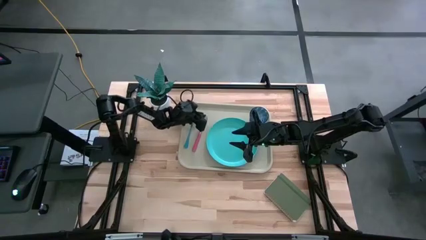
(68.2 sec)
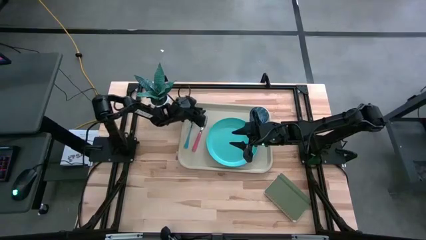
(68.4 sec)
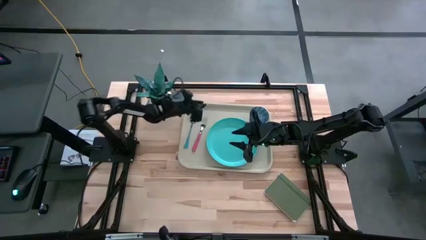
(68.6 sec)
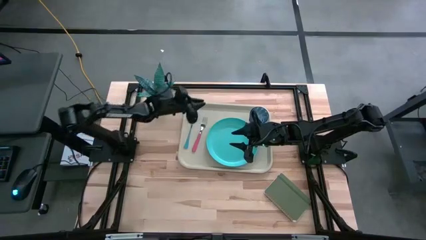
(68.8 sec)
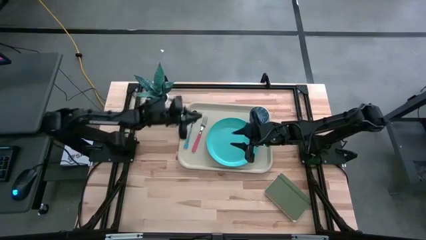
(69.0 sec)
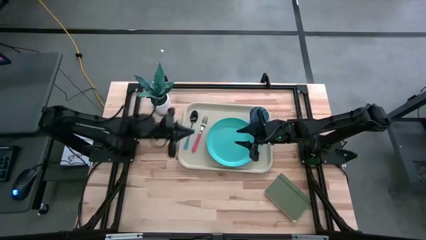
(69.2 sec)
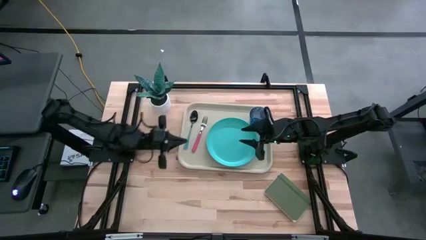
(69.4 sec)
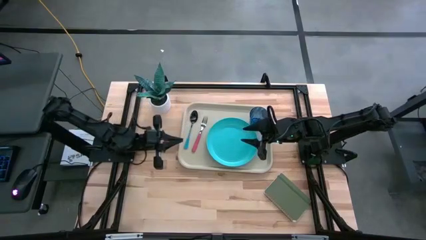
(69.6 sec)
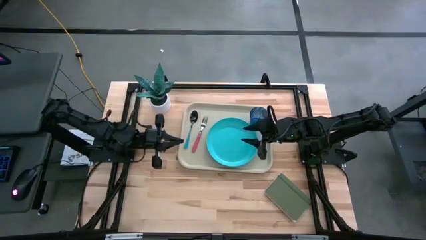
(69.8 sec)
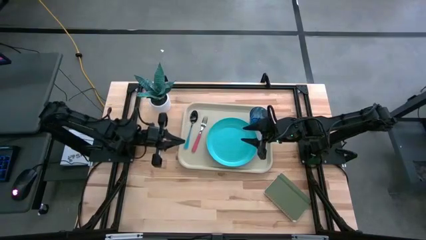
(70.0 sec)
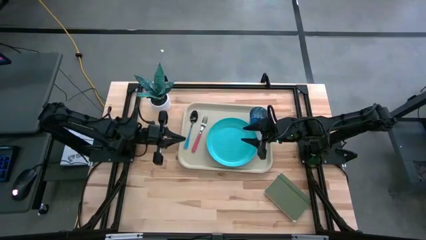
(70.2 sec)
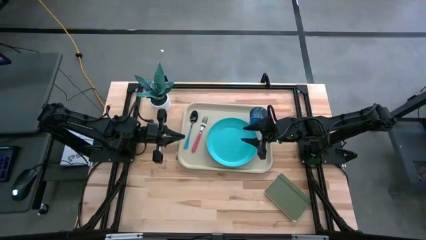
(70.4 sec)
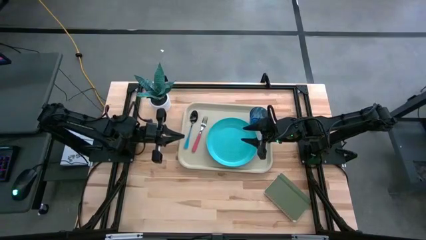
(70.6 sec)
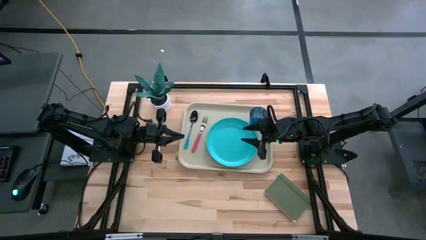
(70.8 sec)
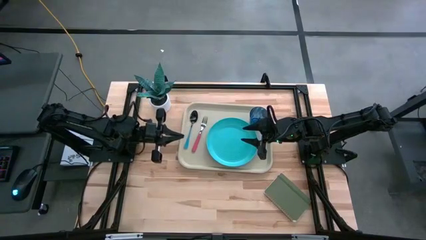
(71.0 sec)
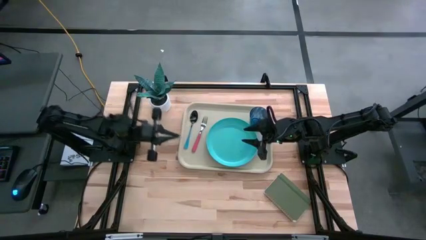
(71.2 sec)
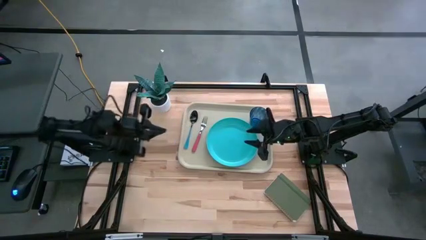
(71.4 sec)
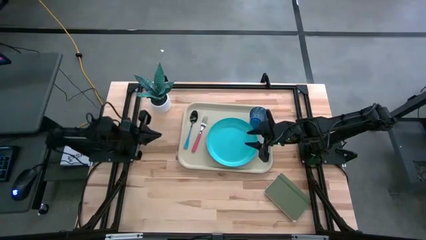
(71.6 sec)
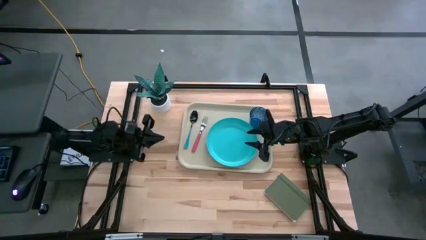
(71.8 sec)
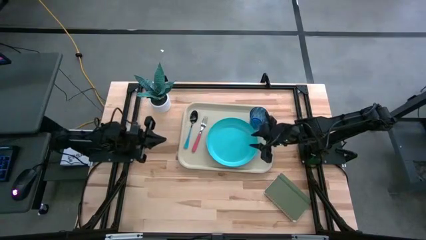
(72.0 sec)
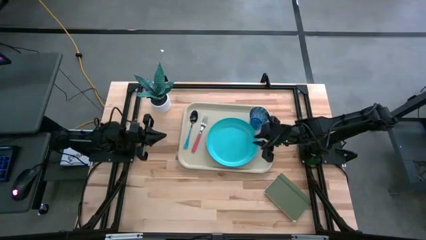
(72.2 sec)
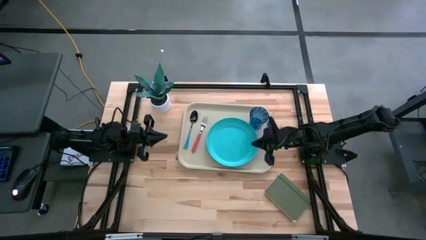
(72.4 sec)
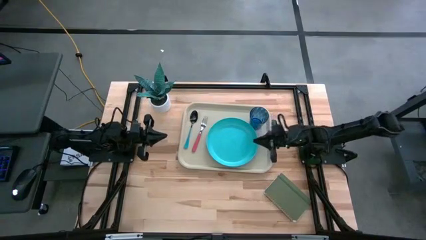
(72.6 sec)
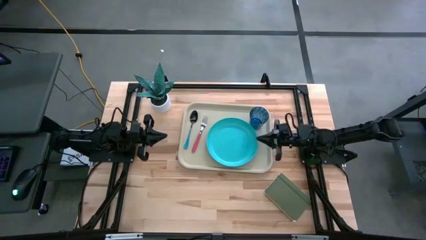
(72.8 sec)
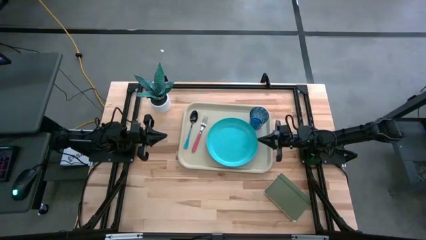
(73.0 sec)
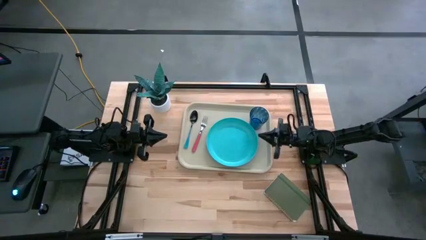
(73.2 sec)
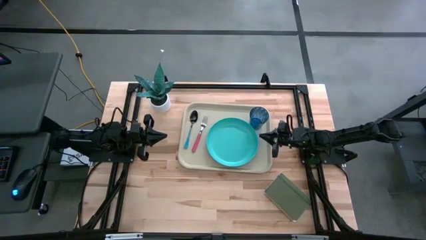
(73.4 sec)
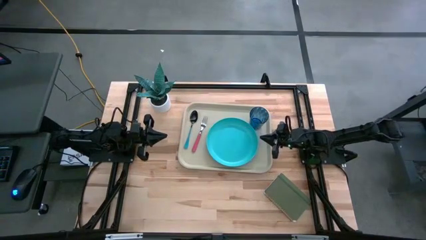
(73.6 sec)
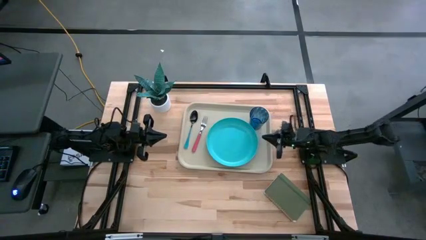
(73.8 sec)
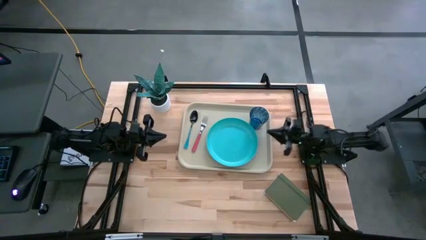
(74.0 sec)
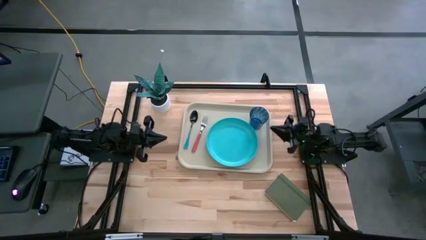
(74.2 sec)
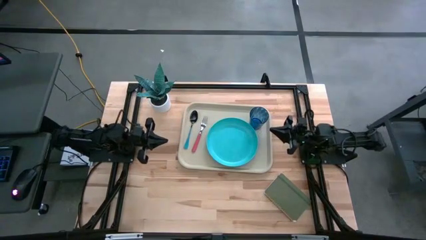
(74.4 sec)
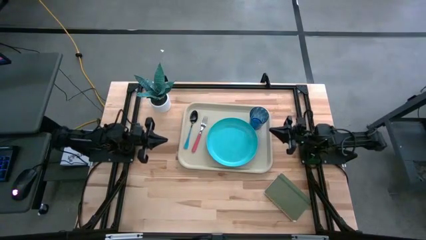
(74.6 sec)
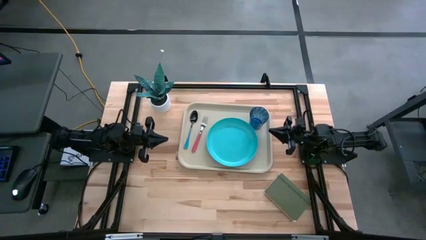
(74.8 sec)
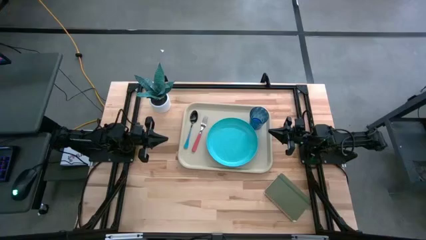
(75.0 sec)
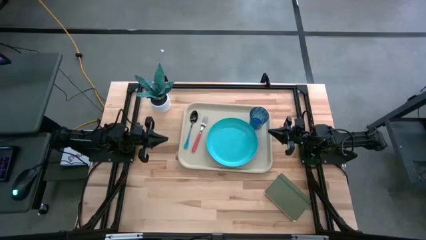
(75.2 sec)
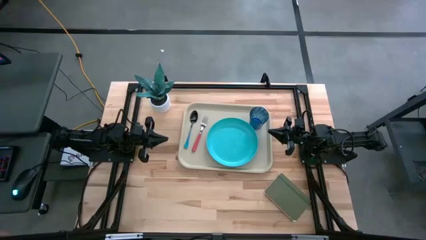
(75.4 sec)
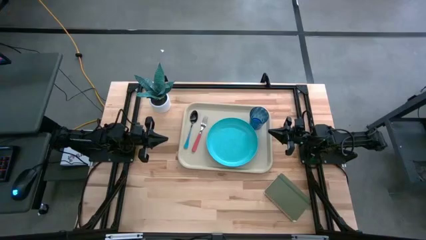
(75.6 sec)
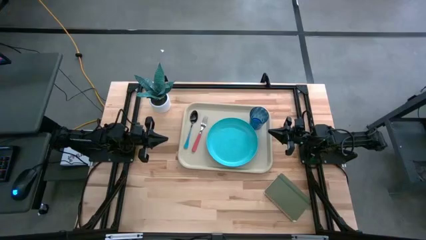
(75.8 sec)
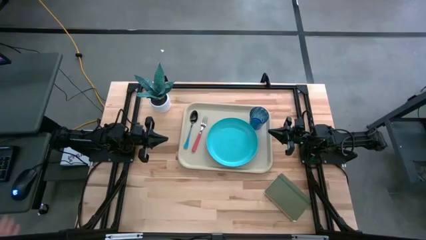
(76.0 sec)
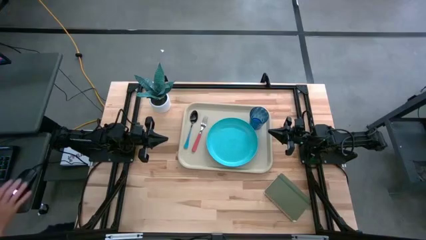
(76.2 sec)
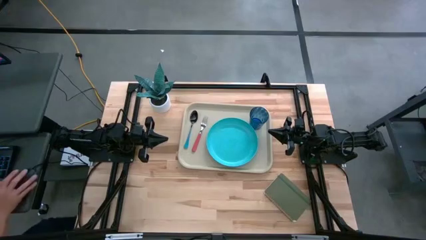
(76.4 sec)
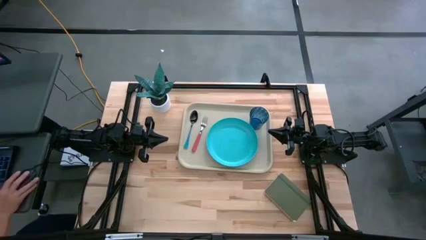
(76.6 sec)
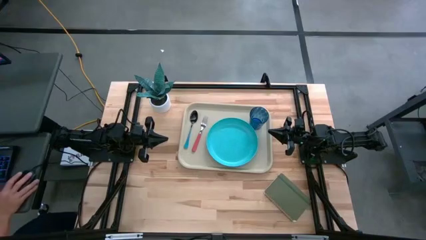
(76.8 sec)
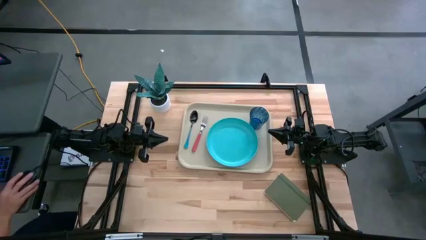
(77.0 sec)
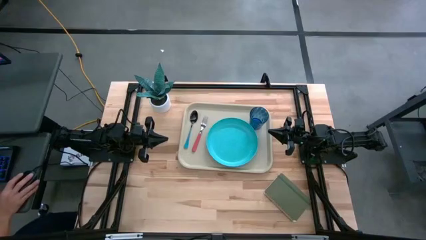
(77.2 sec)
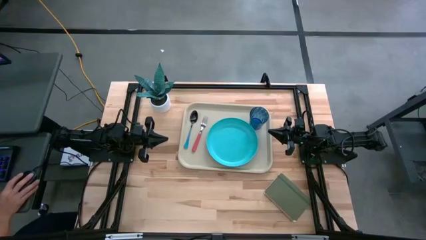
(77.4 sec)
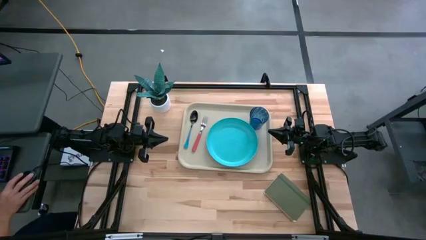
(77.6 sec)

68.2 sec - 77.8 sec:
Task: Pick and place plate/cup/fork/spoon on tray
Return to Home Position

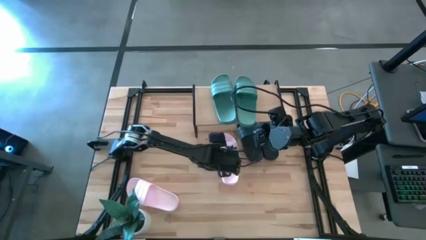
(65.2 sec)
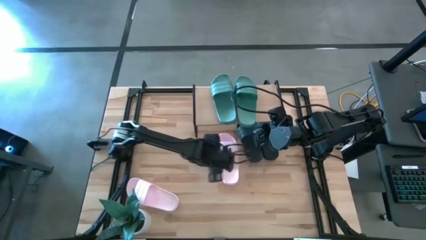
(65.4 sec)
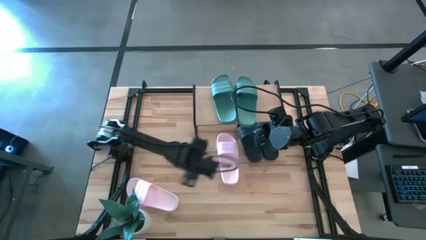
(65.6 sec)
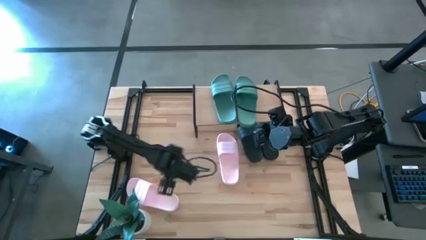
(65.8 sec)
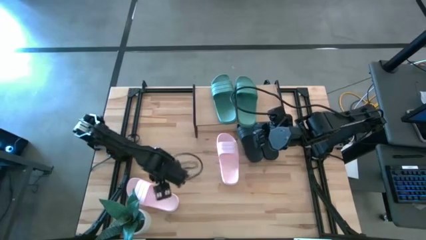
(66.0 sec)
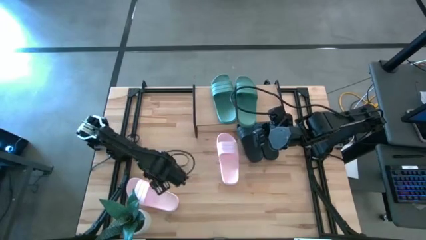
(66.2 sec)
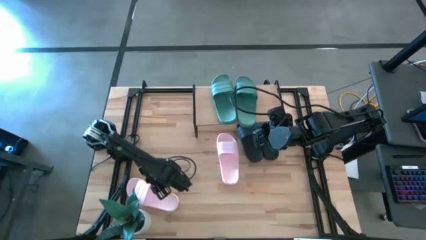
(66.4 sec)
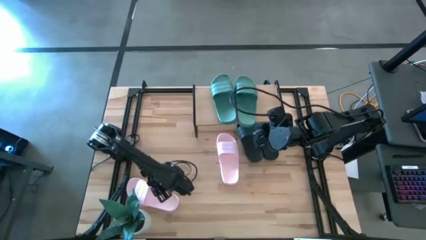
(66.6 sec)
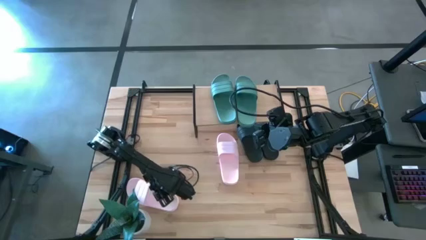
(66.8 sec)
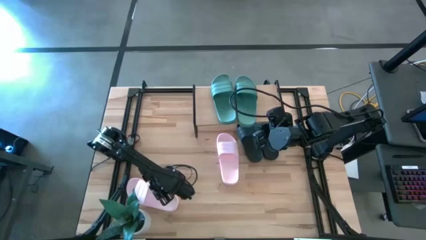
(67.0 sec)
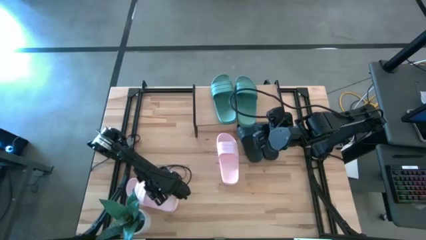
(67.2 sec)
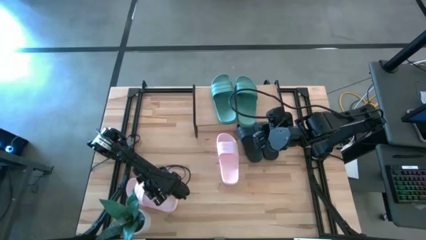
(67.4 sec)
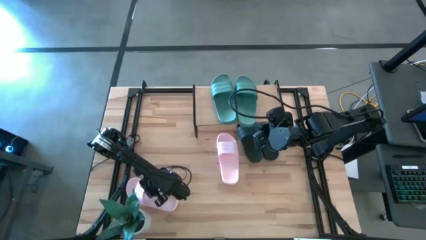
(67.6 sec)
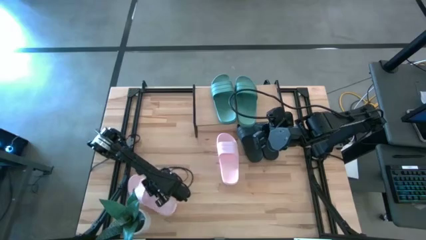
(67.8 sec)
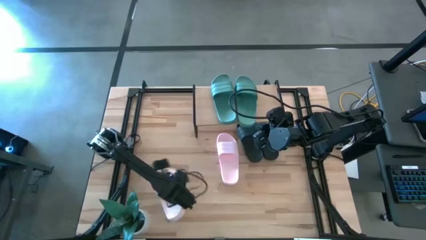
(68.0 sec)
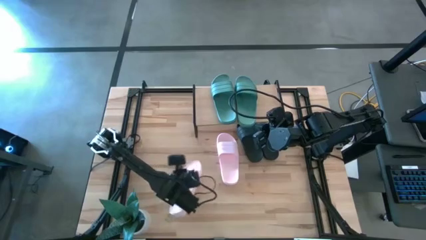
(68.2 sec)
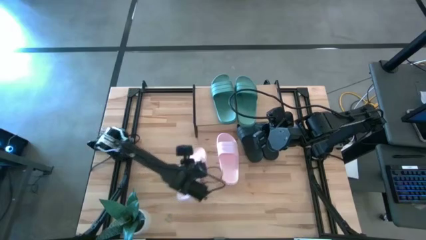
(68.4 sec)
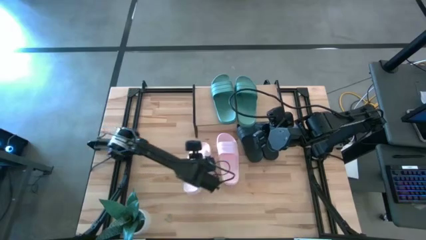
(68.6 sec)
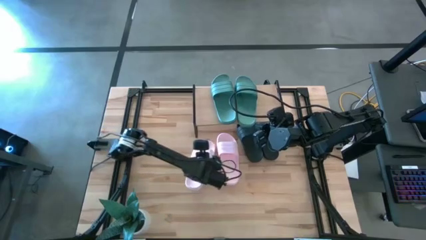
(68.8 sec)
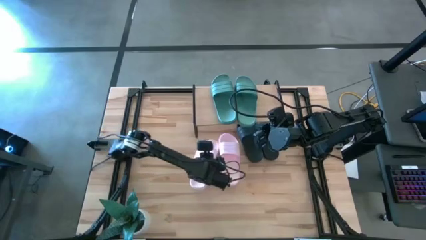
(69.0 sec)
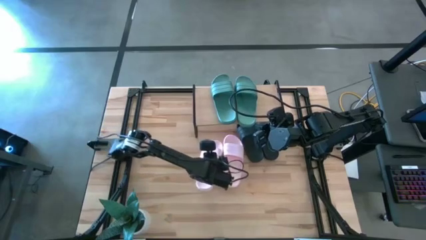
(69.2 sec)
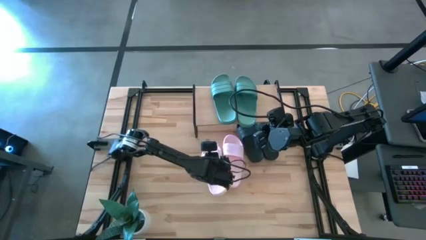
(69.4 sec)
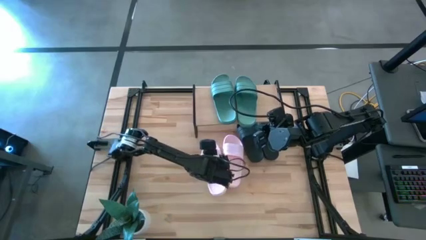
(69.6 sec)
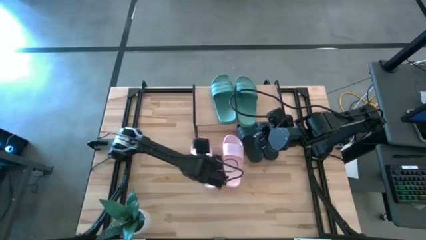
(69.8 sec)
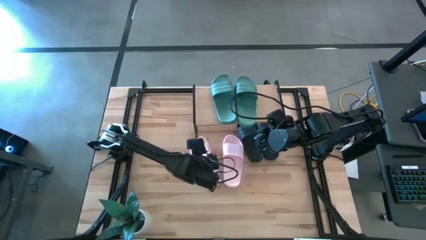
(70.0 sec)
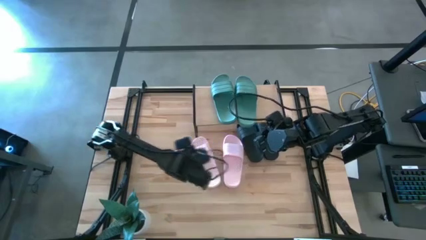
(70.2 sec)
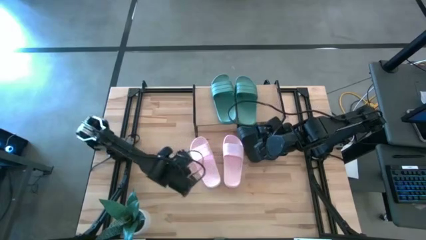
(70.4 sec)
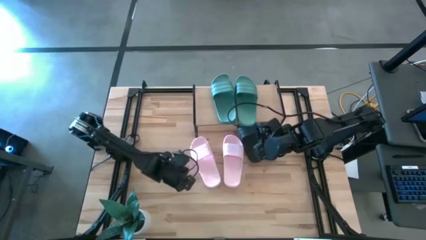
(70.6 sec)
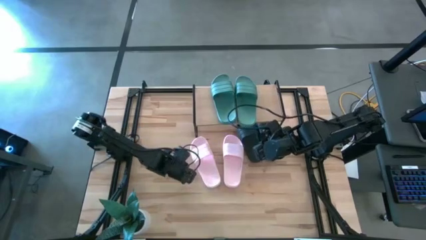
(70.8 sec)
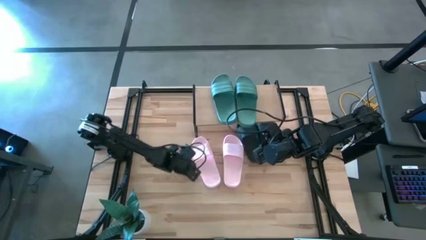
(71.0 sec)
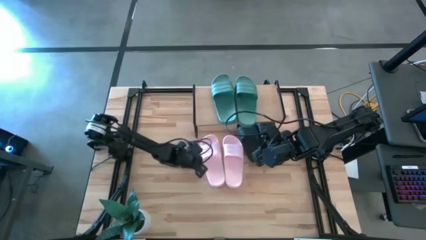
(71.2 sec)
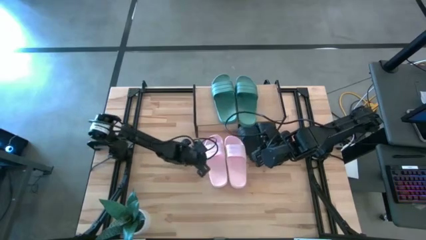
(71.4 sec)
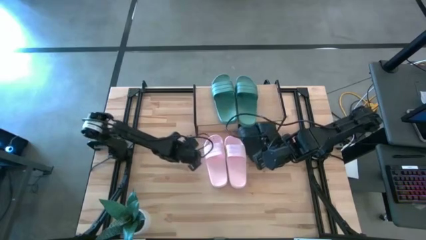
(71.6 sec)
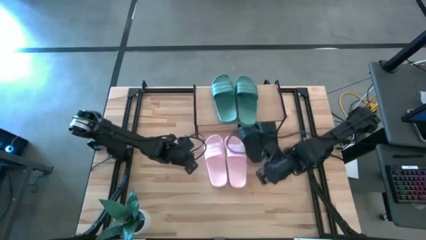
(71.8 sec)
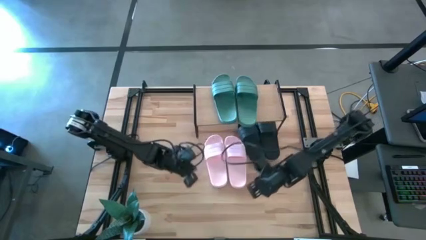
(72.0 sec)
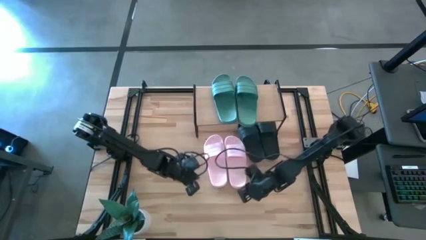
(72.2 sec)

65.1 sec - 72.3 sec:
Task: Pick and place slides into the shelf
Put the pink slides under the shelf
